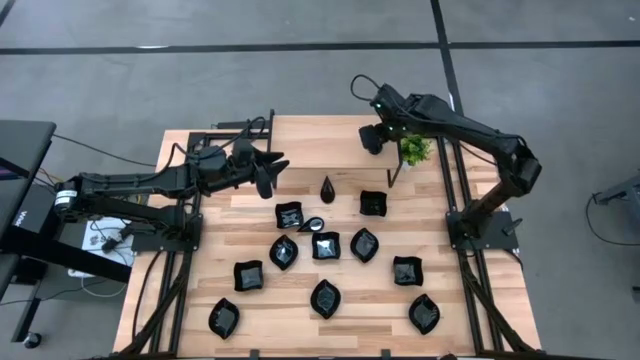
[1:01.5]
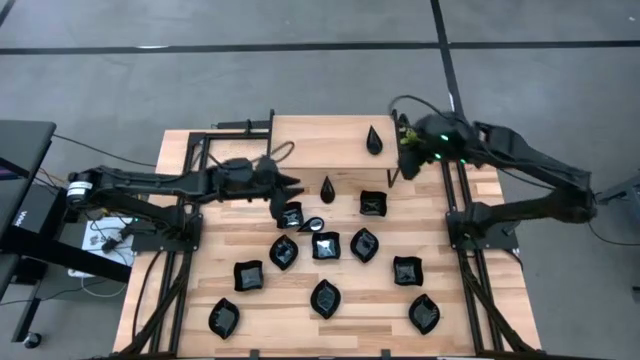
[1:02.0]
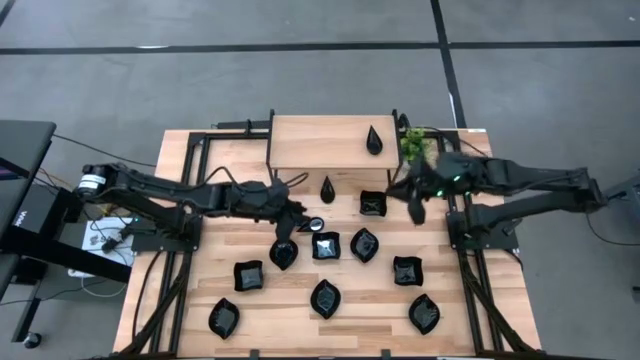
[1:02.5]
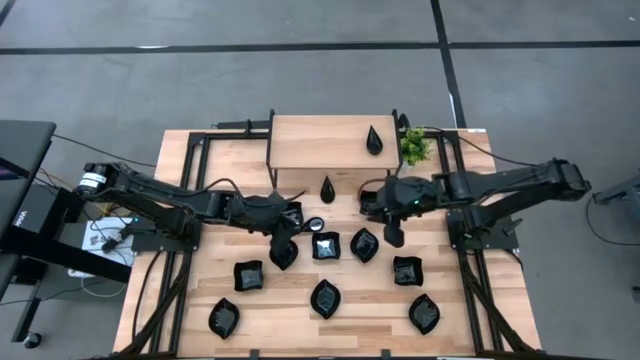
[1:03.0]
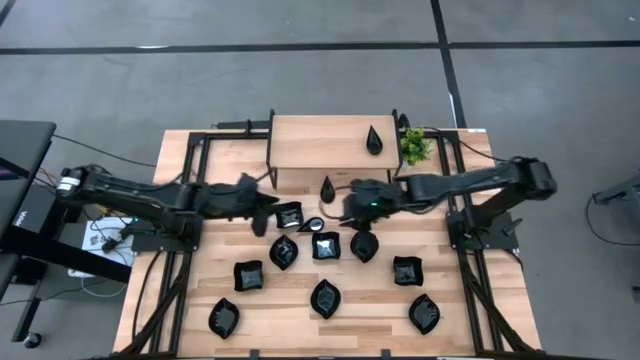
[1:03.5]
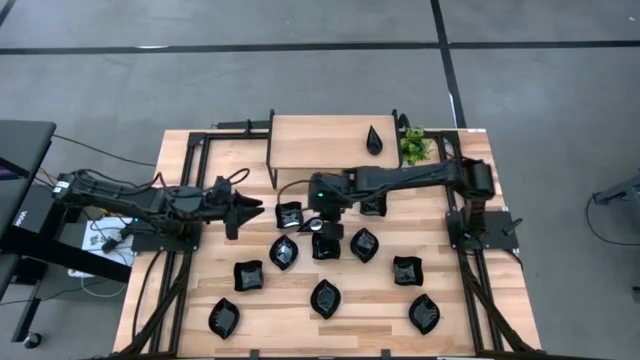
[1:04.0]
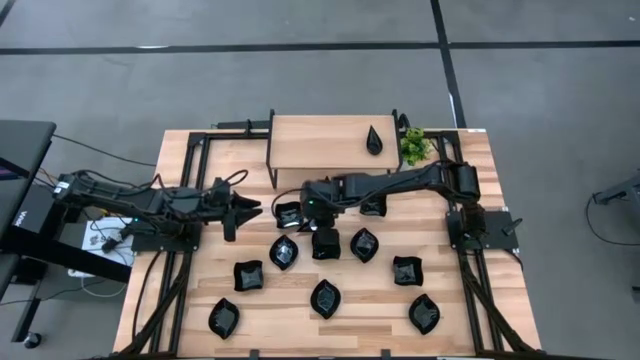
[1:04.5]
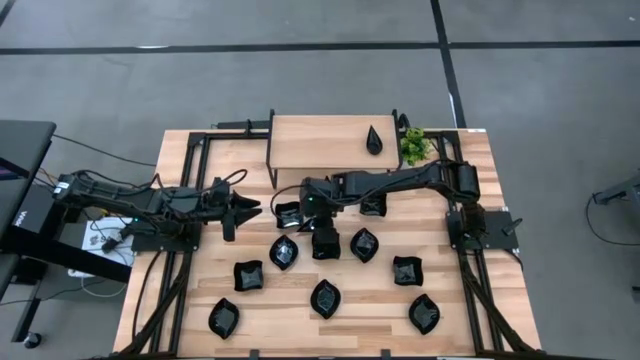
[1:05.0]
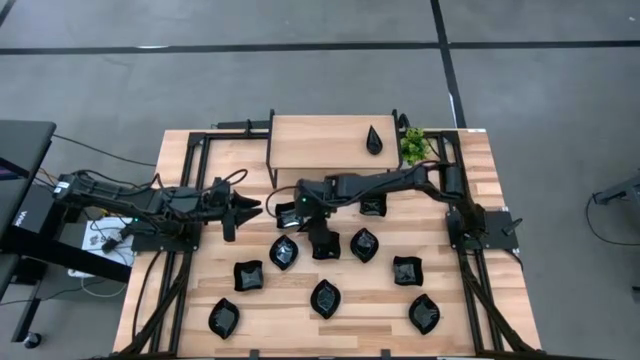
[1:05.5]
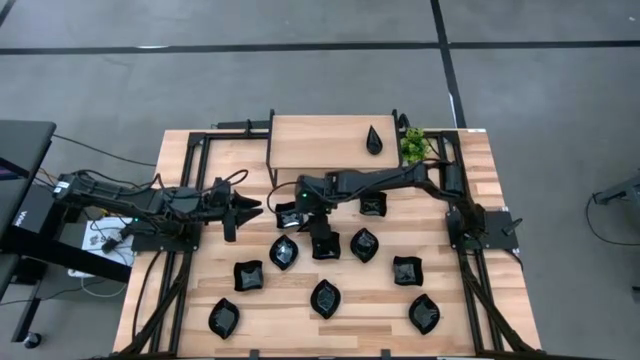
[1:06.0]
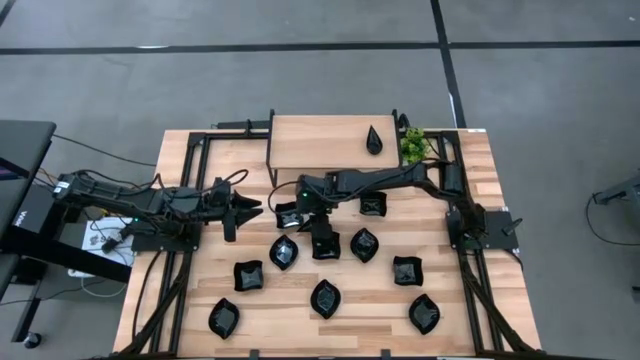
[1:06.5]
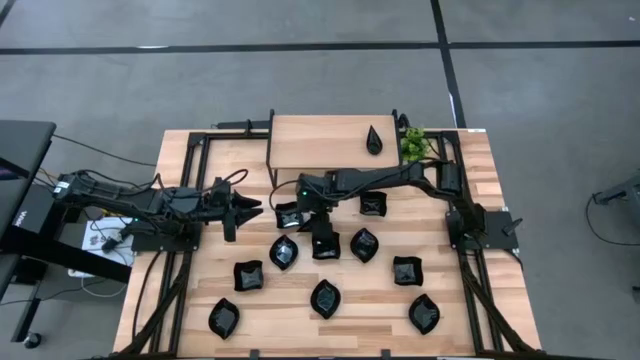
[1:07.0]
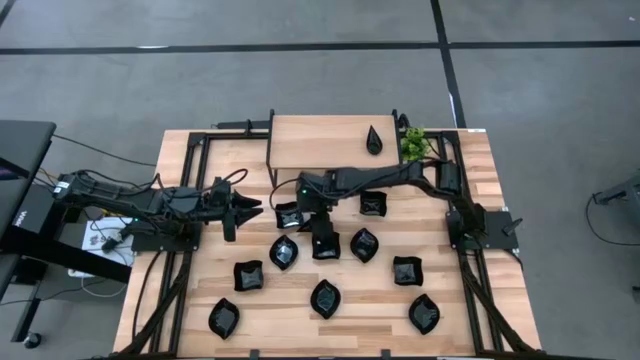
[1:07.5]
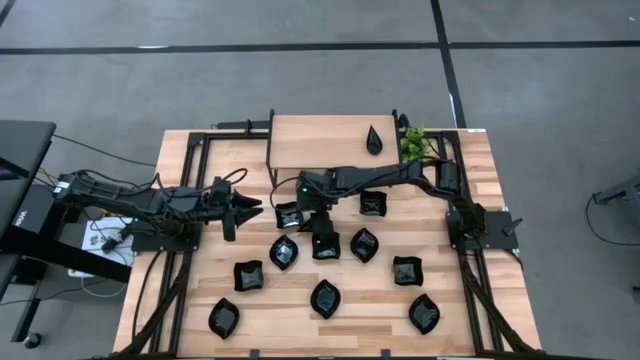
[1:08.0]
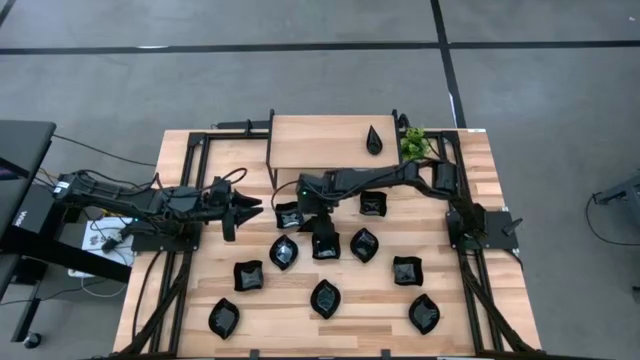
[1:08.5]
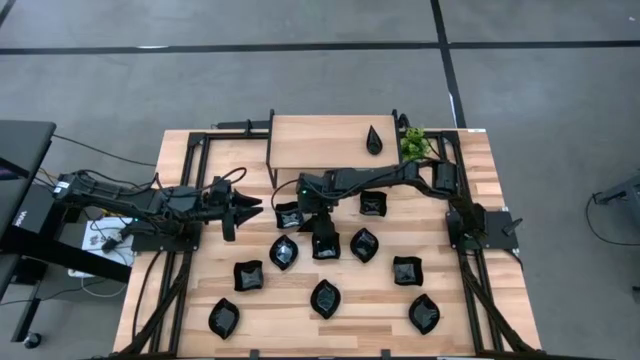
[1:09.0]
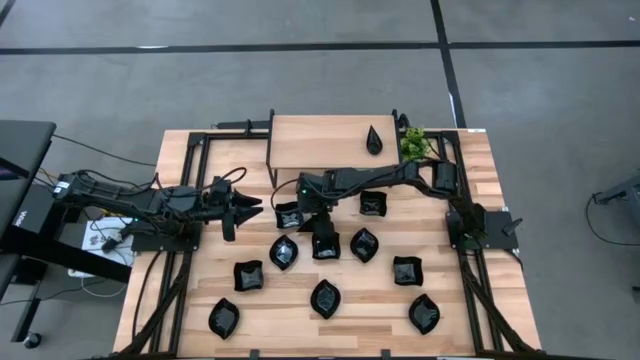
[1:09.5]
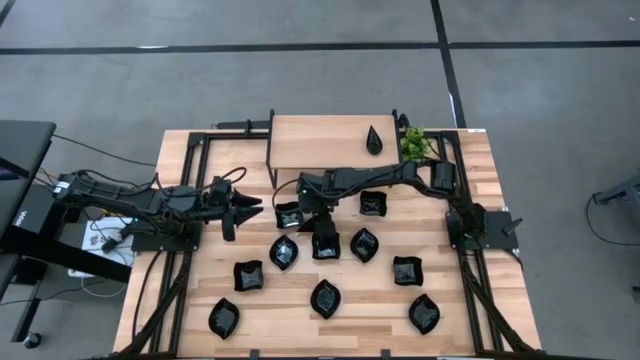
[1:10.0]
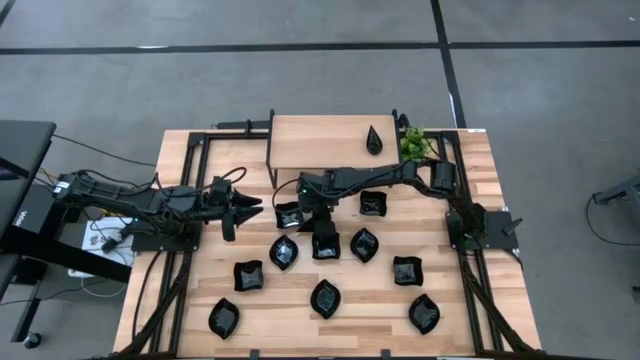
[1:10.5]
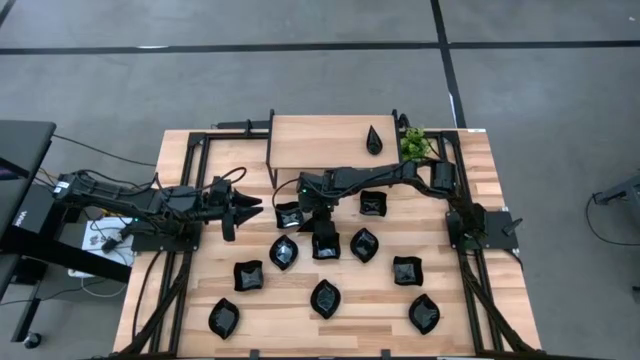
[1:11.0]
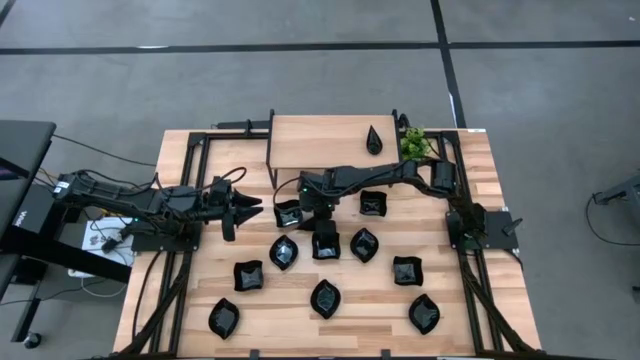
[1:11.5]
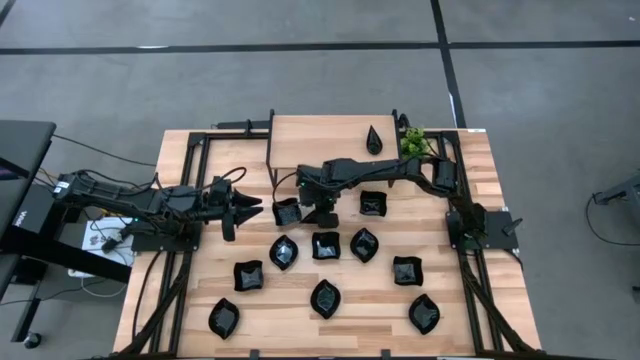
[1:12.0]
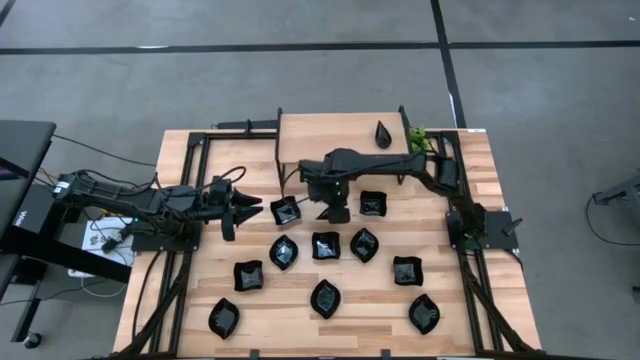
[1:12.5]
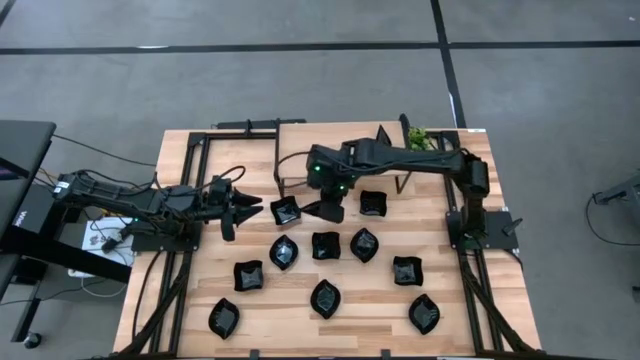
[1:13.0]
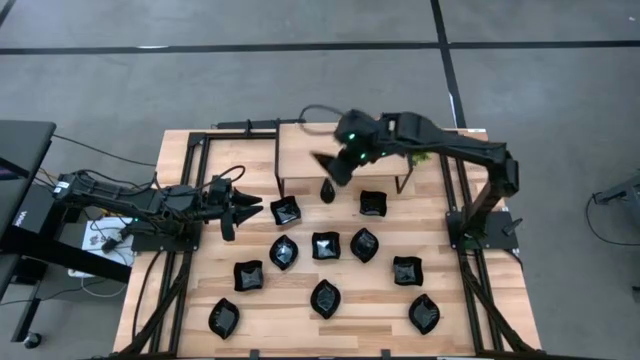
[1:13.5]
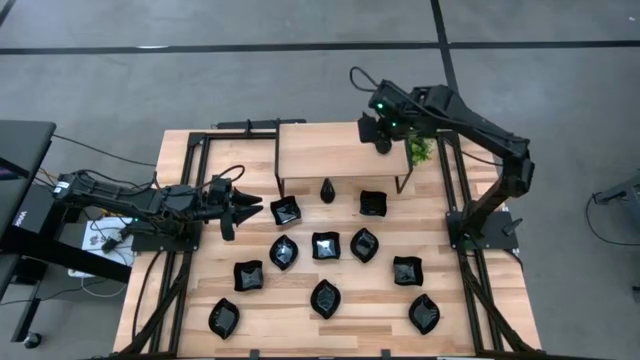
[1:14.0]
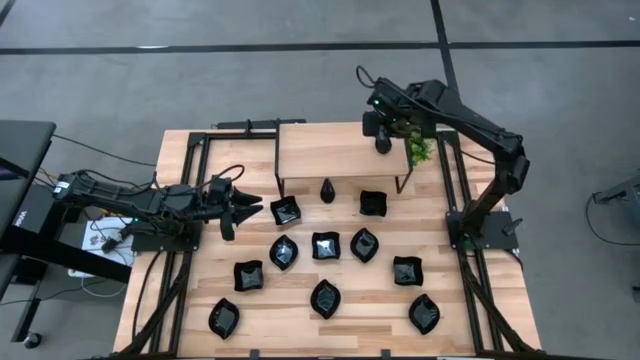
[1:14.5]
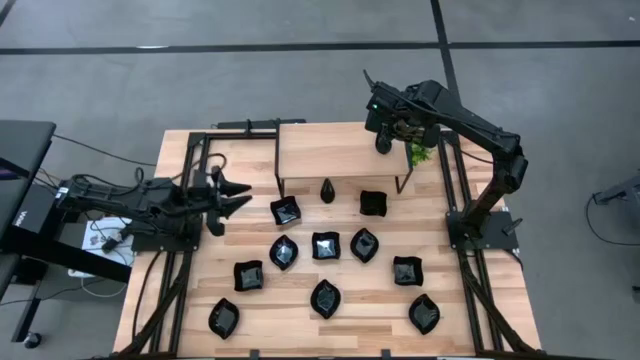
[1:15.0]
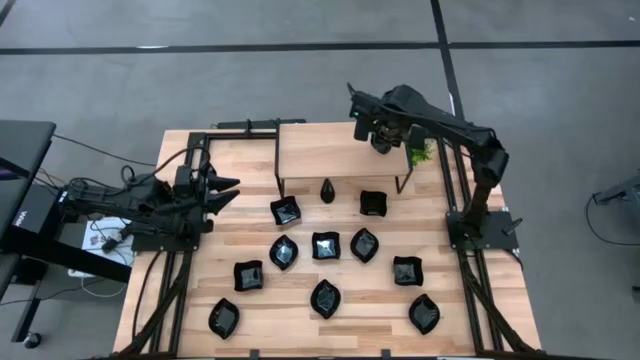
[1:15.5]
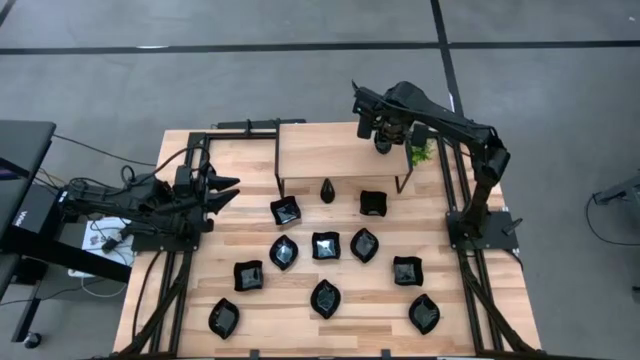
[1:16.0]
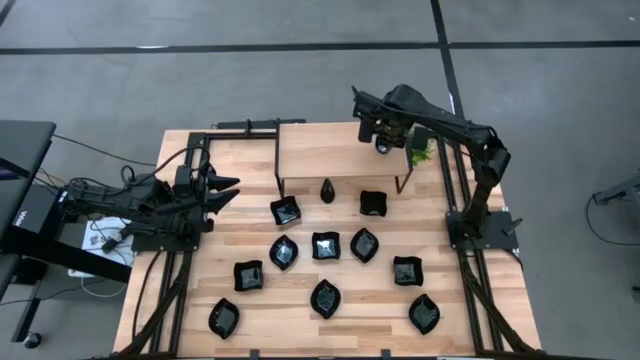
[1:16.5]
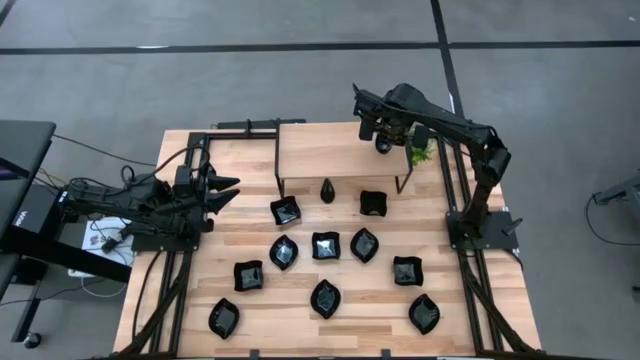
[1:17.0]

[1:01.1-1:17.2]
Task: Pick & Place Mini shaped plates
Stack the drop-shaped plate on top of the drop-shaped plates on the shelf

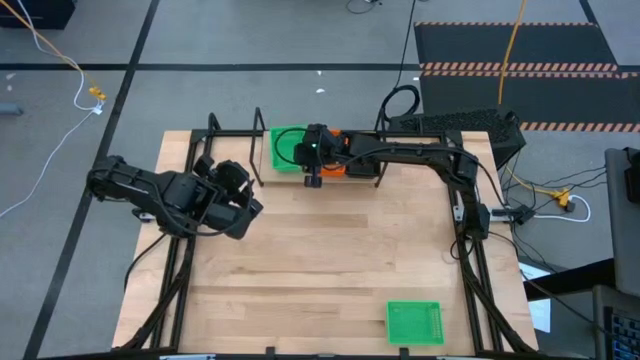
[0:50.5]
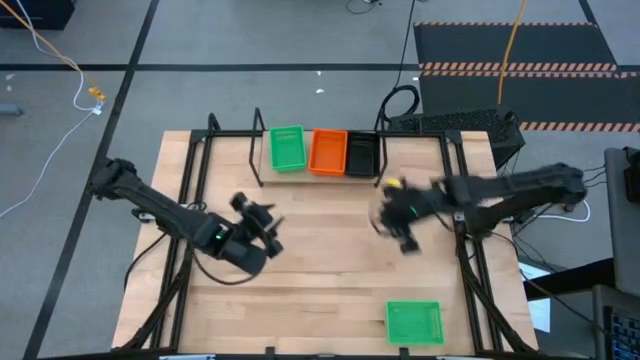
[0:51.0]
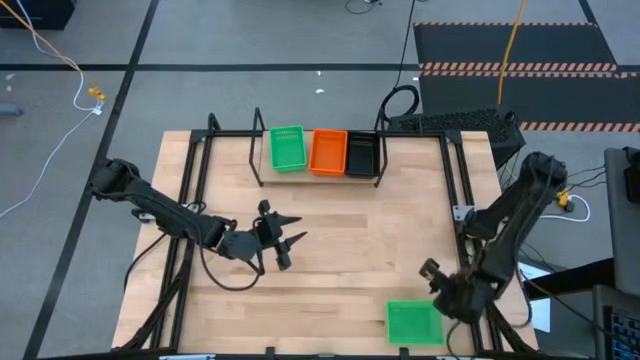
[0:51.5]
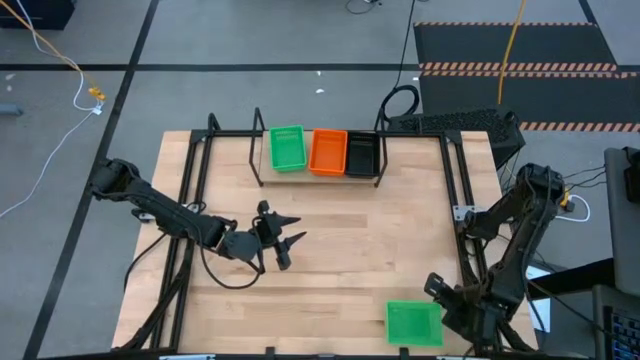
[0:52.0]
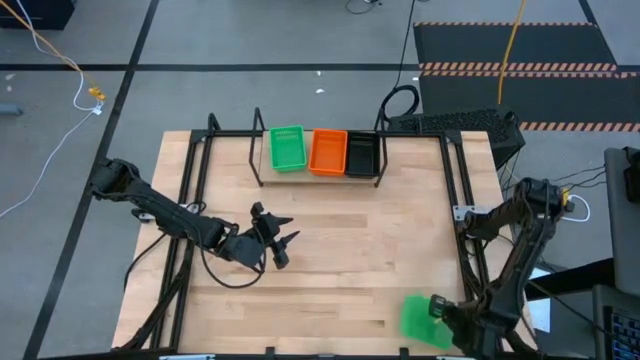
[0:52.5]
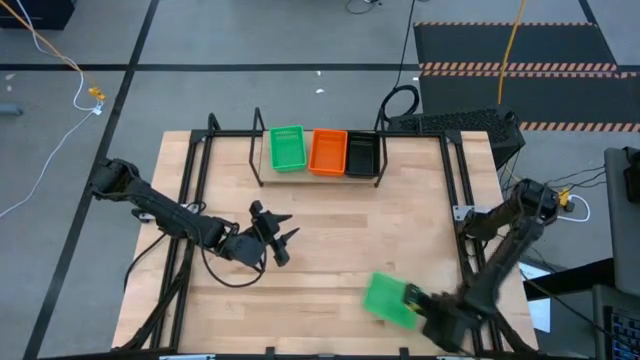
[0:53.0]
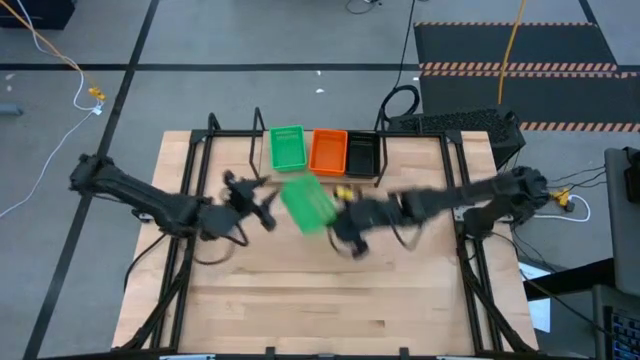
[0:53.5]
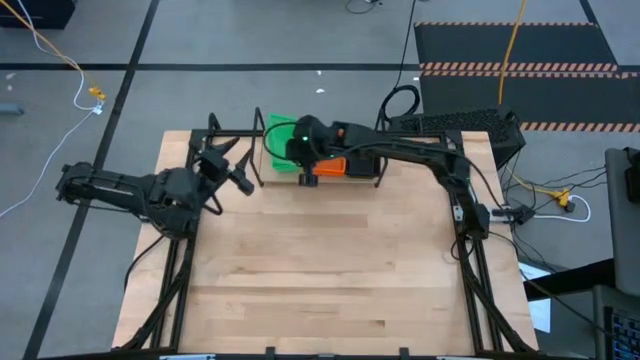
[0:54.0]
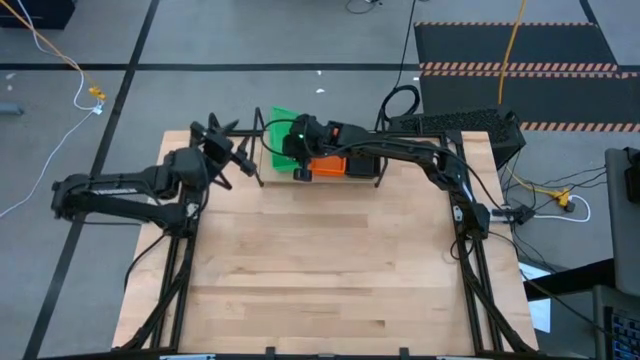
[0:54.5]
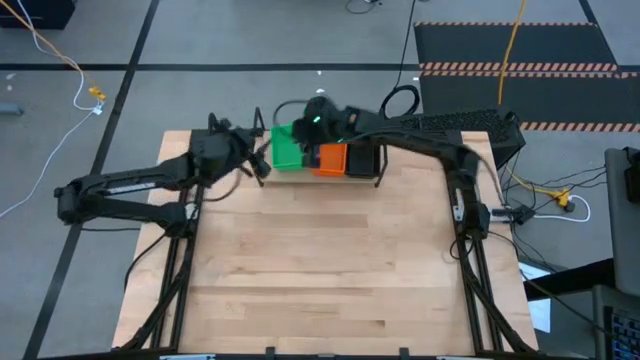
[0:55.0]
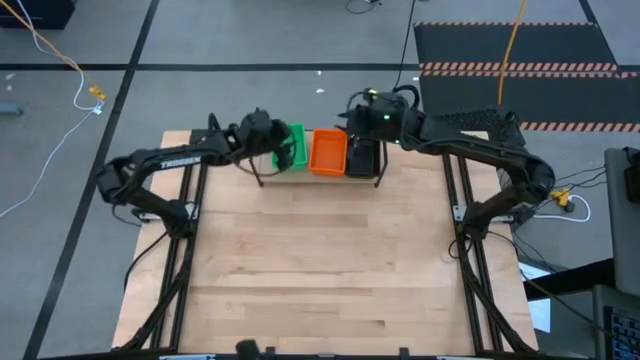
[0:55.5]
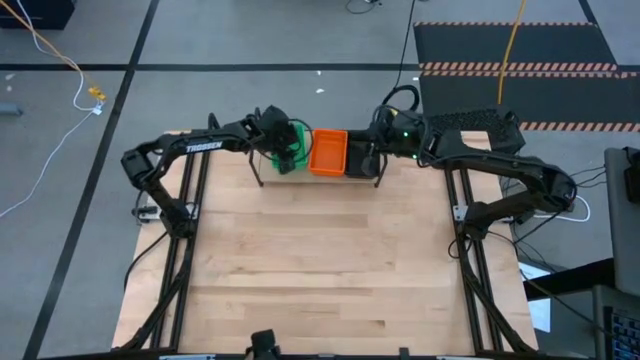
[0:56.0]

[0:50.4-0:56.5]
Task: Stack baskets on shelf by color
Stack the green bin on top of the green bin on the shelf
